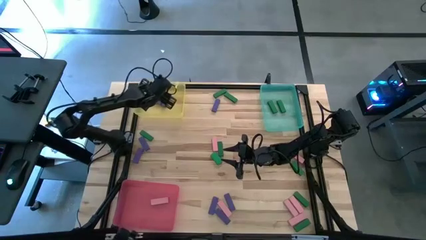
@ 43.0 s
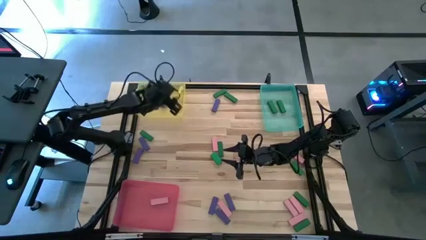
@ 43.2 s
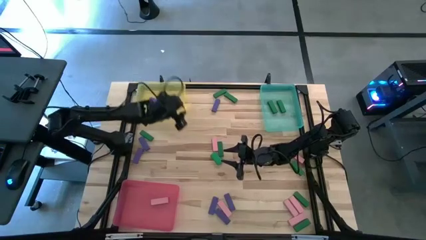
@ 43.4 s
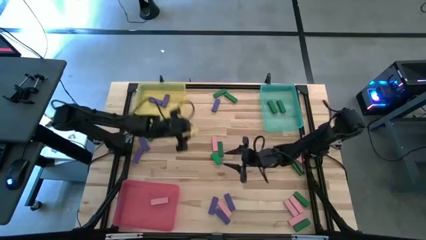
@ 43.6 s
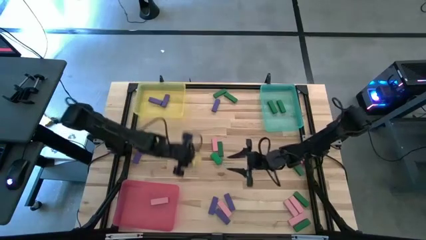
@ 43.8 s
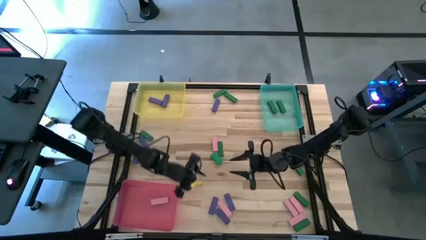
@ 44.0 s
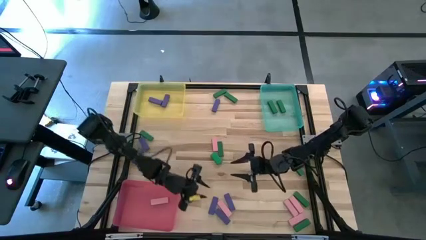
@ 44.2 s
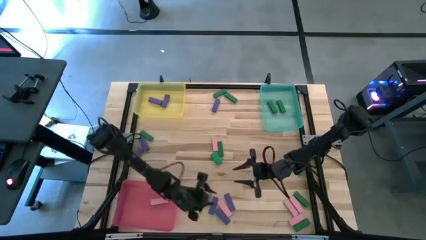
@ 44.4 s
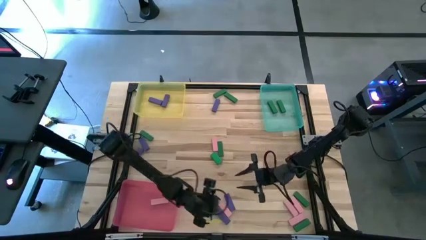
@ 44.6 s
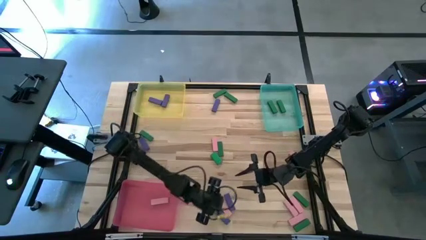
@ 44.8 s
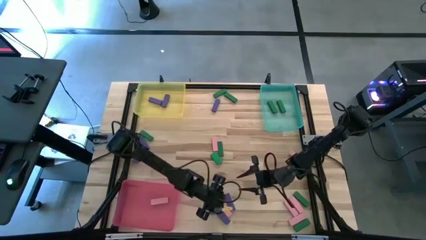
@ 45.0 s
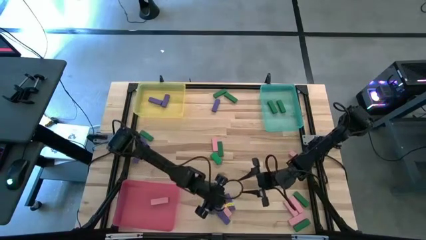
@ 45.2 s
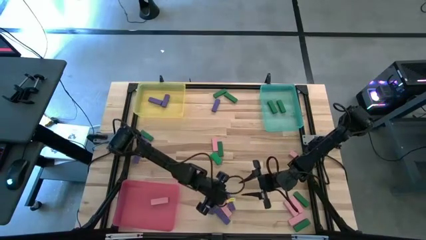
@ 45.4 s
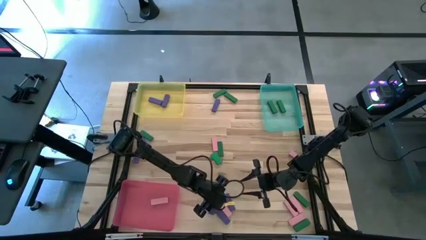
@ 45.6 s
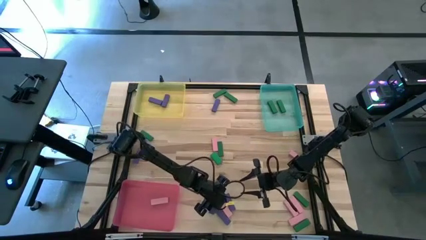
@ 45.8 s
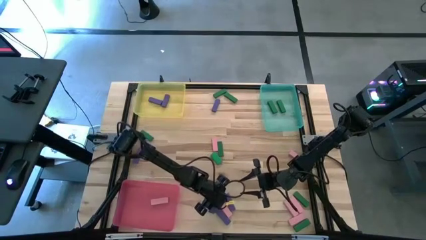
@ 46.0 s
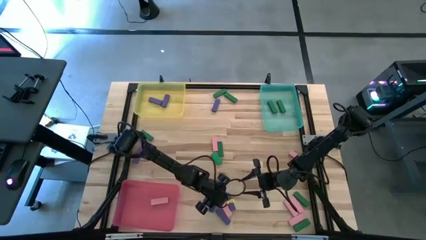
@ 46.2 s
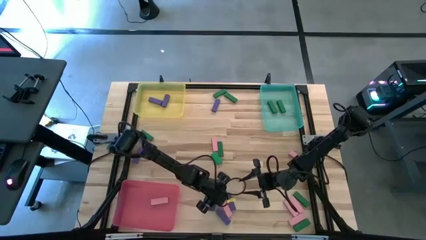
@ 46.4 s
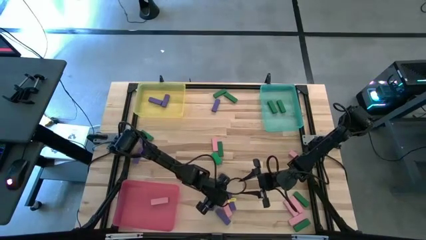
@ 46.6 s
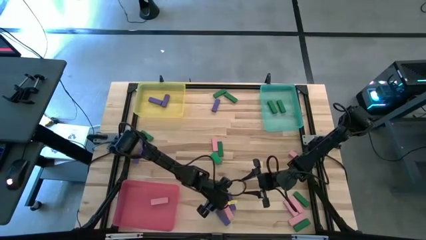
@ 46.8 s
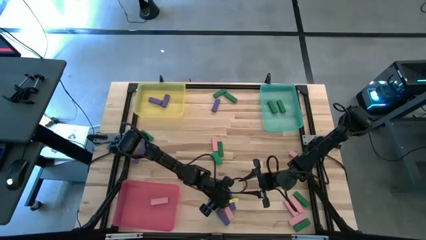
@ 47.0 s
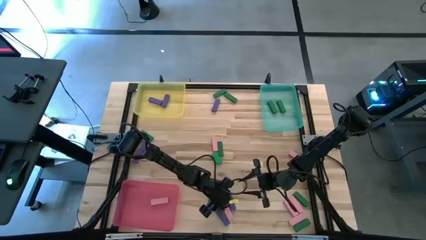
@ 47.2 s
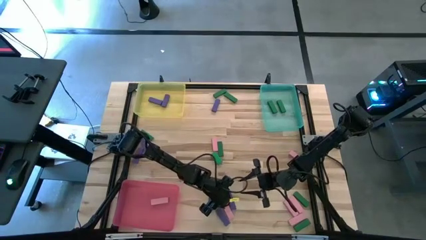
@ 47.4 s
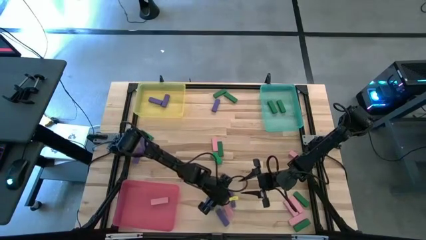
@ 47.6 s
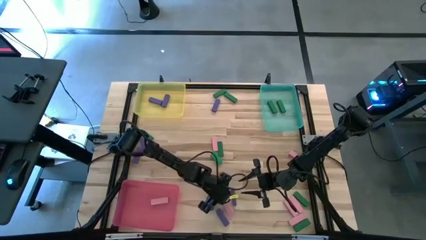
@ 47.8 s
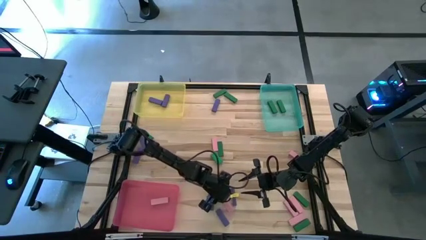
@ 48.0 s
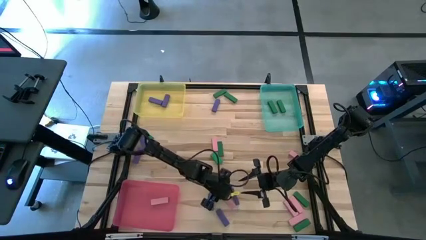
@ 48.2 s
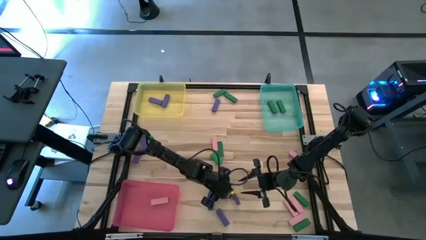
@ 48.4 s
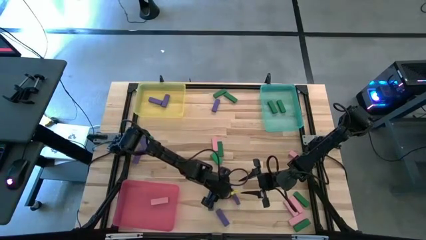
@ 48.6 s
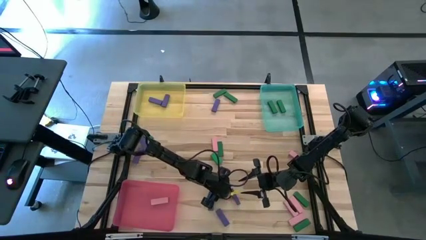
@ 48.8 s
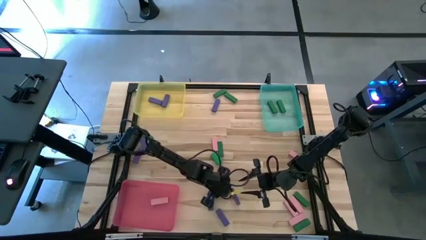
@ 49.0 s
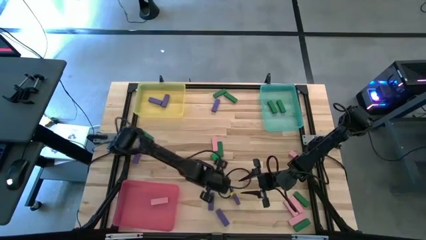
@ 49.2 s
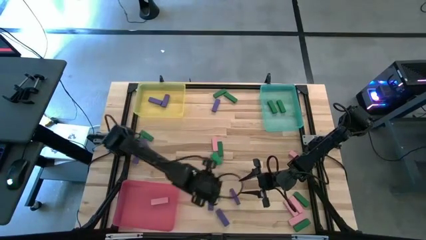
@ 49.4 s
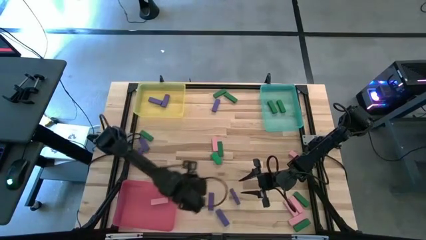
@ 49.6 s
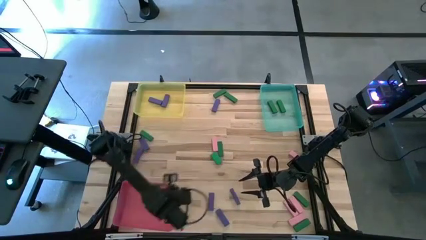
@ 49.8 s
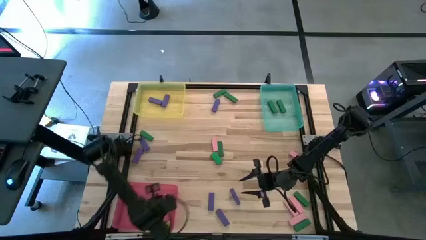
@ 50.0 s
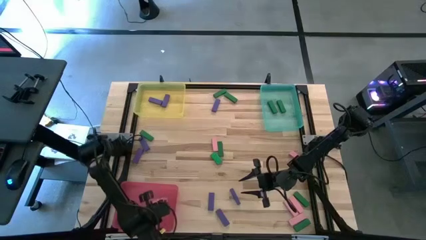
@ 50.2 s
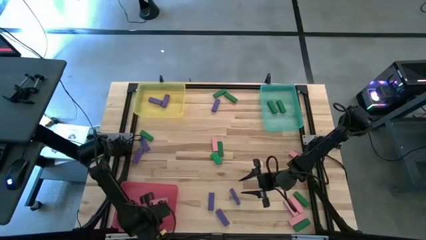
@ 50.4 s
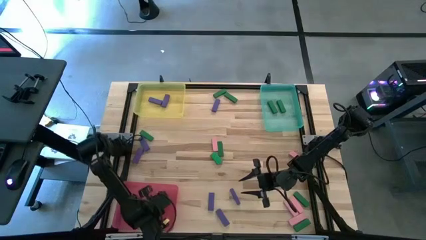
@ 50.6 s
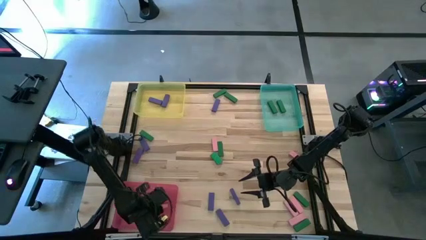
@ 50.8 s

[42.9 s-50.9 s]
Task: Sort blocks
Put the pink wooden block into the pink bin

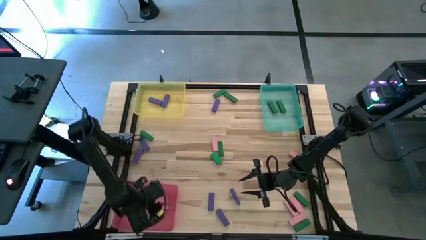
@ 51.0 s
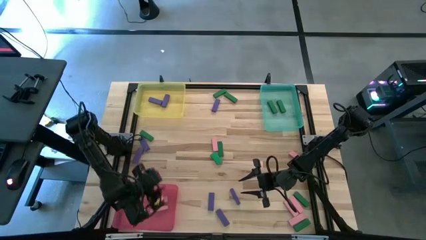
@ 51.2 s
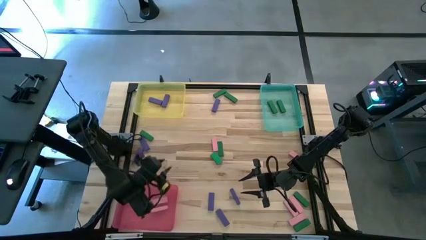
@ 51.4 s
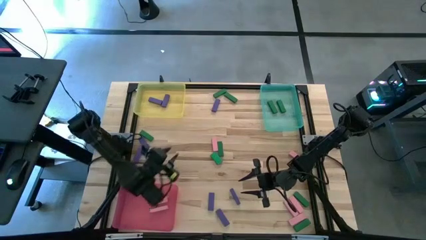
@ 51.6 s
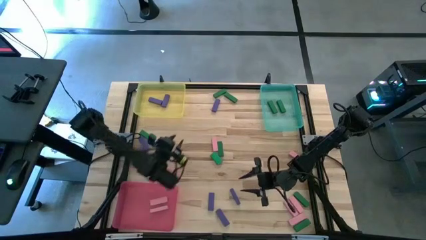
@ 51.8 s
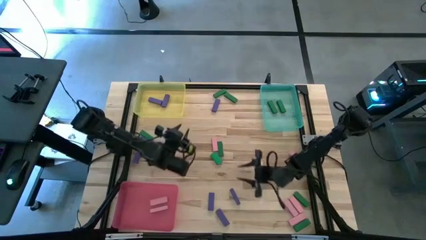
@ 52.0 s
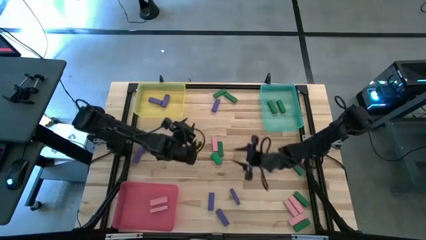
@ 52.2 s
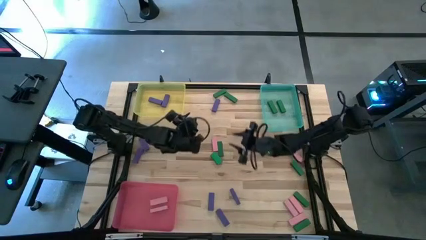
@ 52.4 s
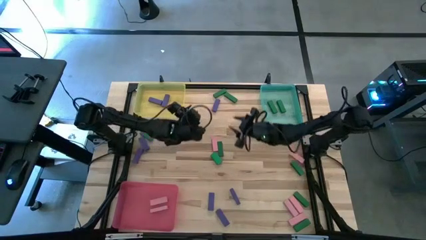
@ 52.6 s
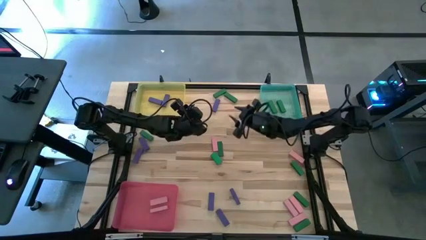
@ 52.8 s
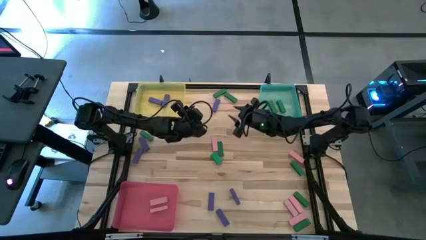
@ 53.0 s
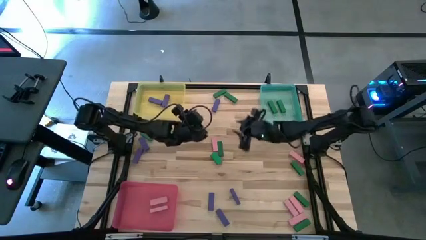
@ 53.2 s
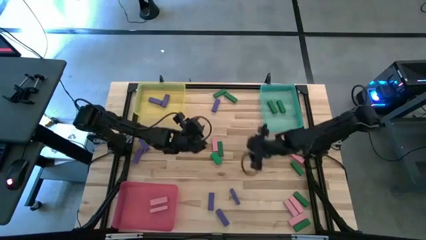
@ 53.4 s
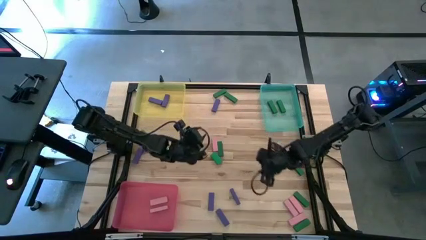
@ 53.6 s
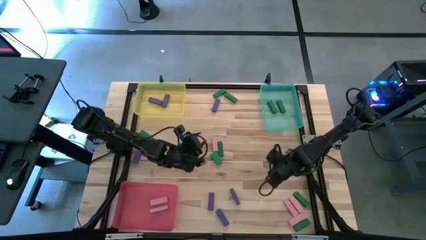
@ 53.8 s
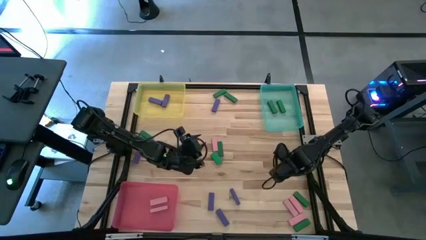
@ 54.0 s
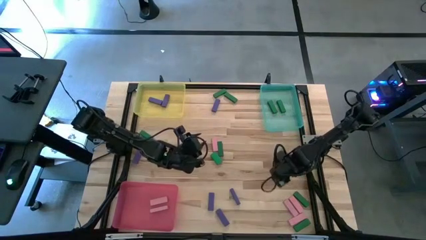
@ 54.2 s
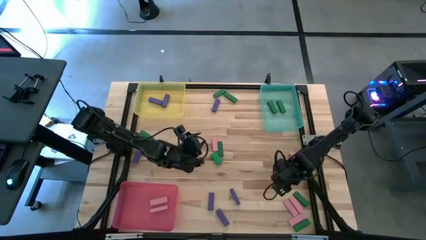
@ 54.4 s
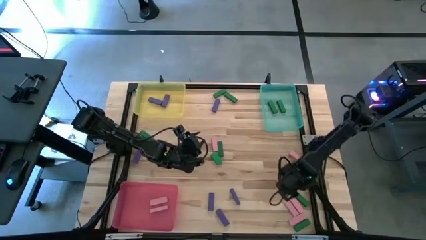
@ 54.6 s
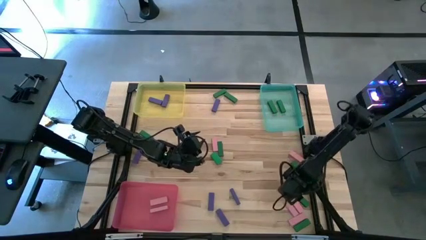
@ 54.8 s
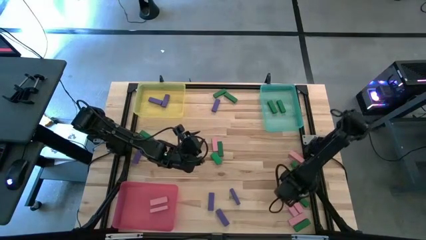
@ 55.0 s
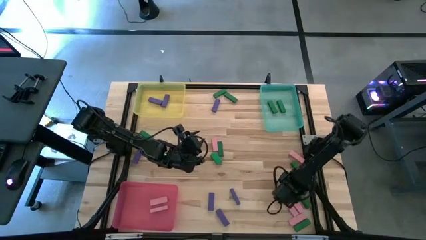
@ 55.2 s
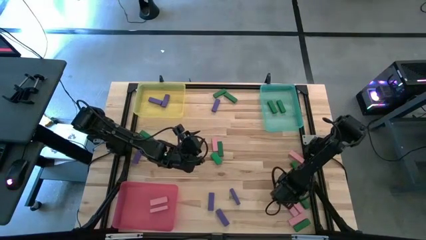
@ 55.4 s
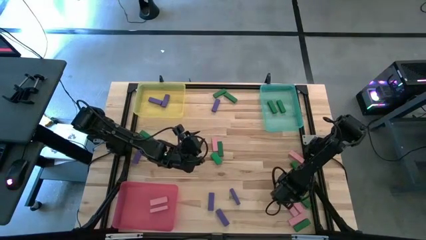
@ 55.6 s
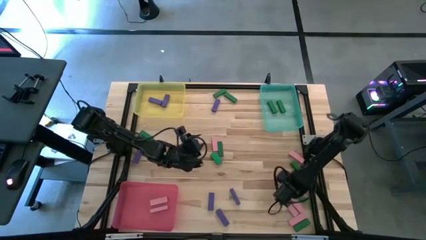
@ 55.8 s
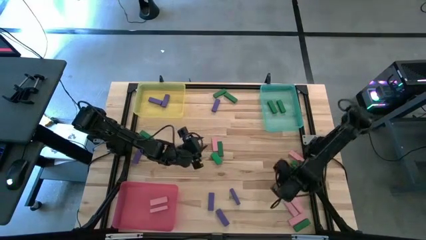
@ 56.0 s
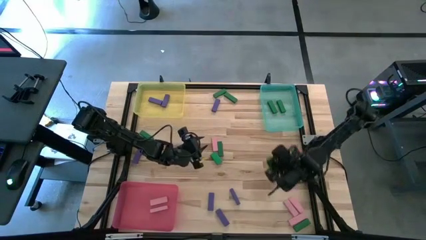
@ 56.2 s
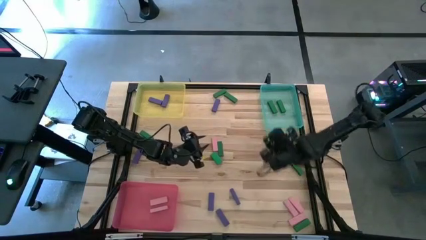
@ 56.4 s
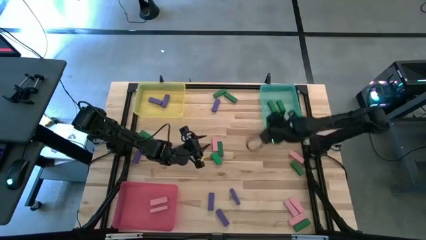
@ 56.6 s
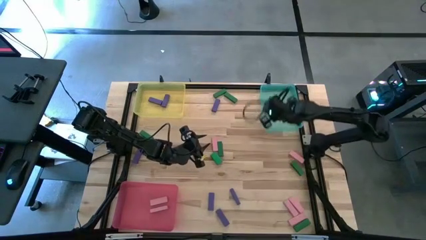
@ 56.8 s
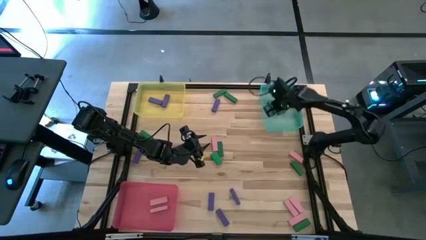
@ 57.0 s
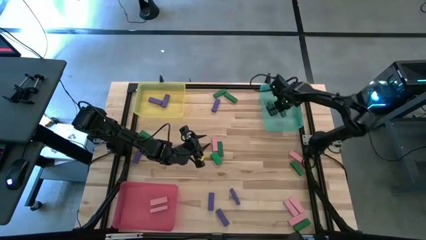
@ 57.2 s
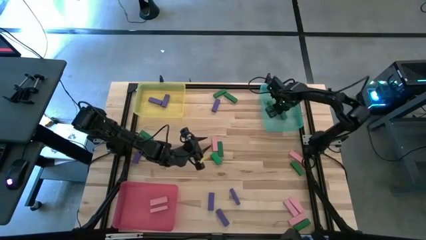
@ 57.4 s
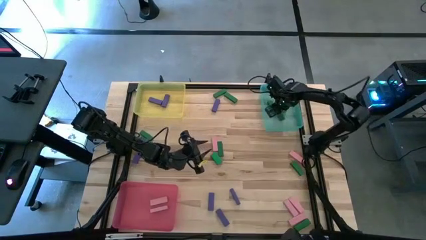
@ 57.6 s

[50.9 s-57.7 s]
Put the green wooden block into the green bin

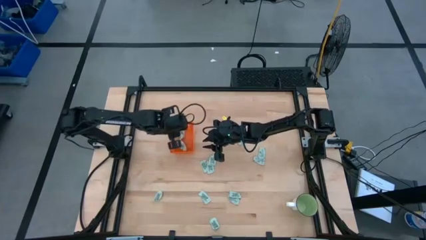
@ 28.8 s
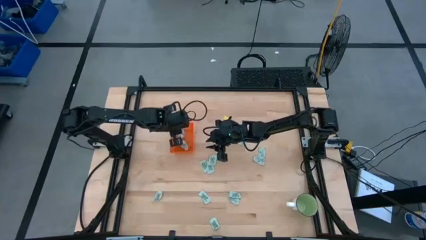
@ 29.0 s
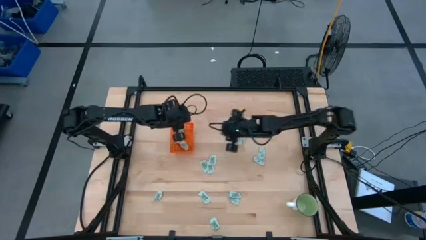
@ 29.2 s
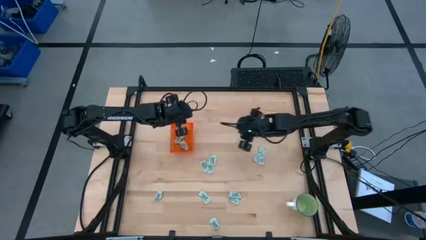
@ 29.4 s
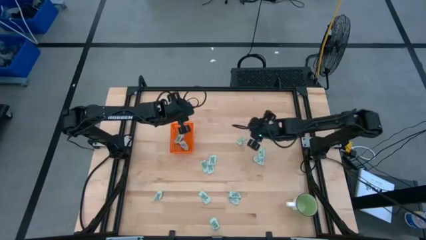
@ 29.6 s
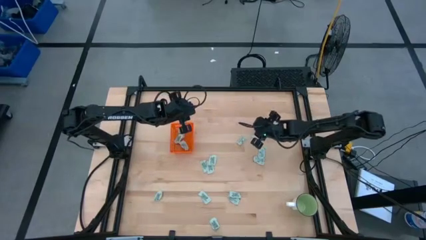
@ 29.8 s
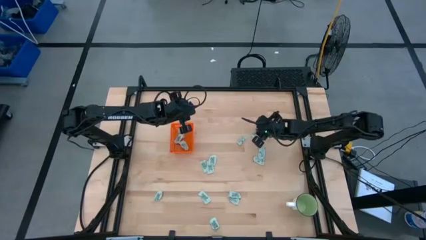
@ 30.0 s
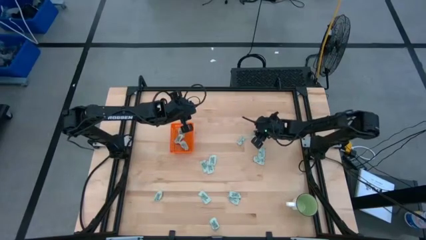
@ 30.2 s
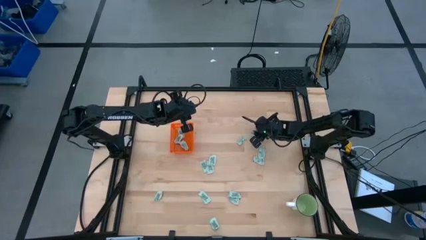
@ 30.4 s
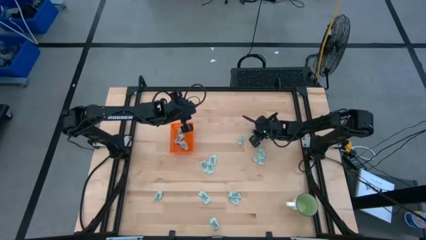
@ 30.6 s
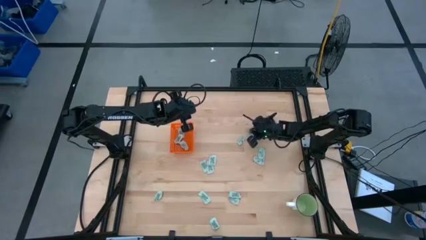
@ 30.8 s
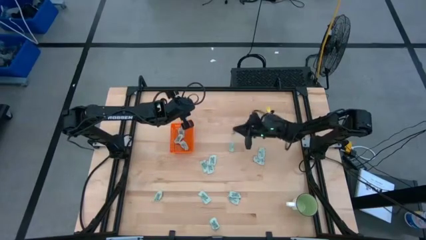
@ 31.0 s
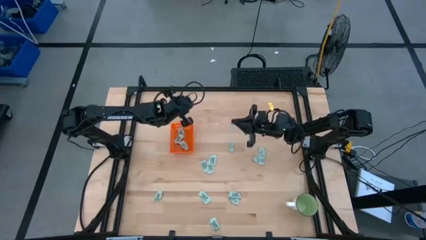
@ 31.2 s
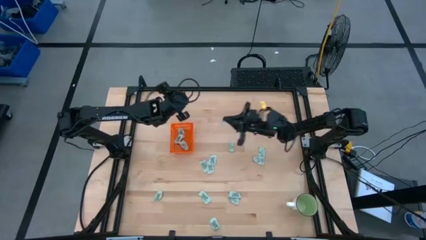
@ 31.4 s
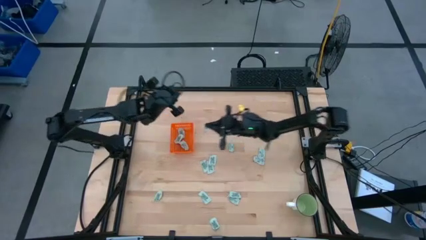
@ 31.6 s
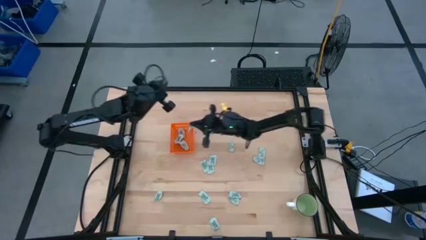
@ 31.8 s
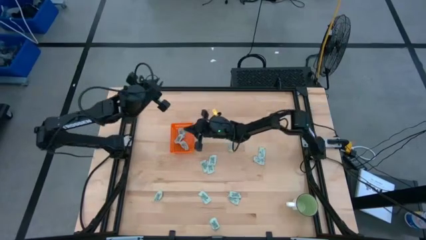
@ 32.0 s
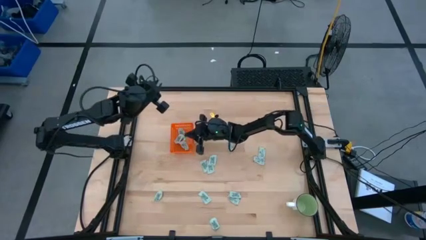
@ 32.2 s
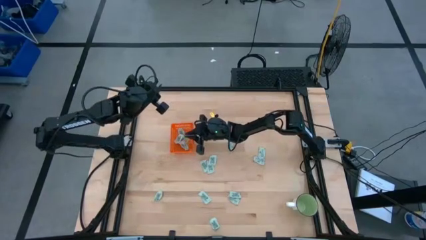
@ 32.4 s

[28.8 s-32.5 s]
Task: Pick and place Stevia / Truvia into bins
Put the green stevia packet into the orange bin
